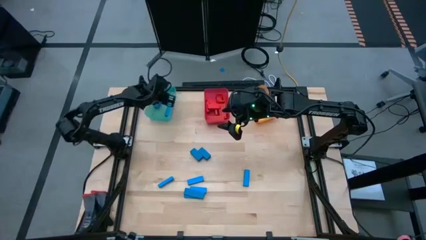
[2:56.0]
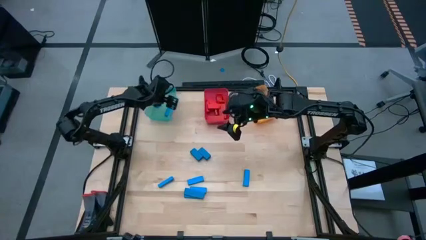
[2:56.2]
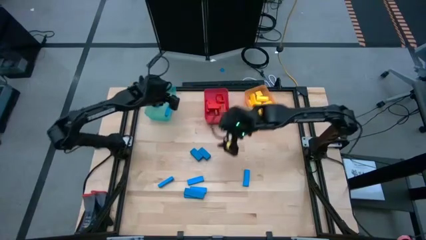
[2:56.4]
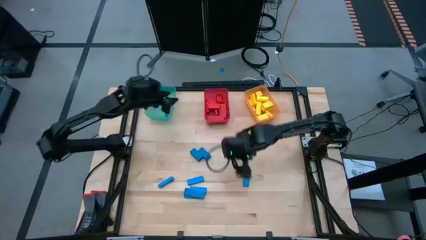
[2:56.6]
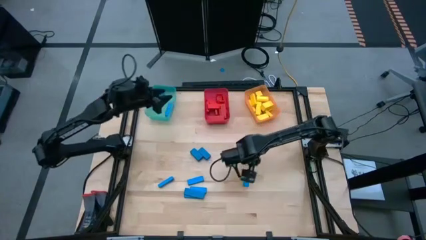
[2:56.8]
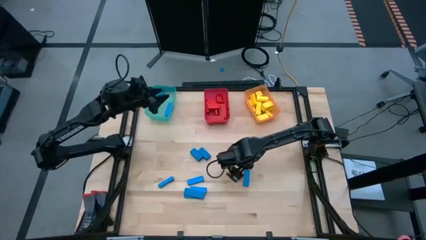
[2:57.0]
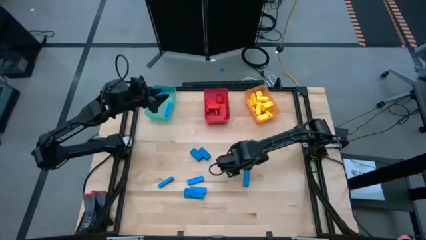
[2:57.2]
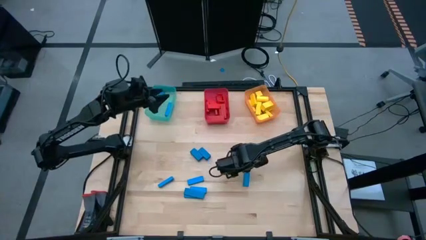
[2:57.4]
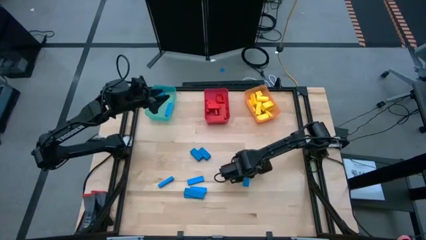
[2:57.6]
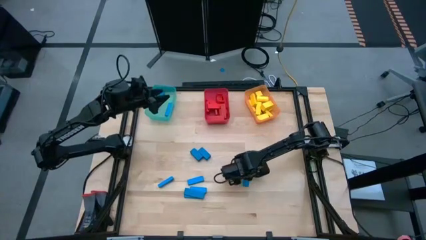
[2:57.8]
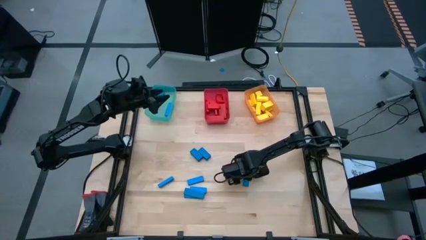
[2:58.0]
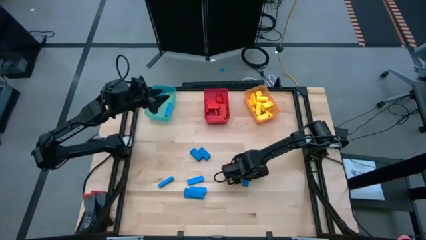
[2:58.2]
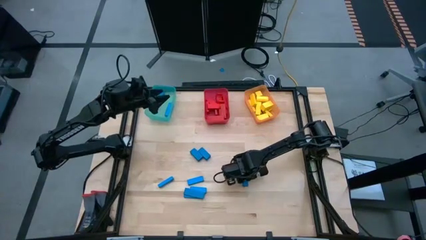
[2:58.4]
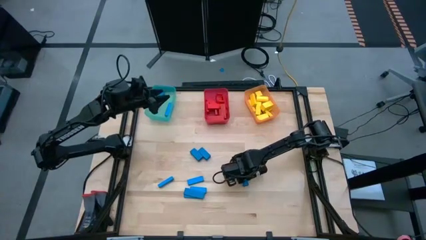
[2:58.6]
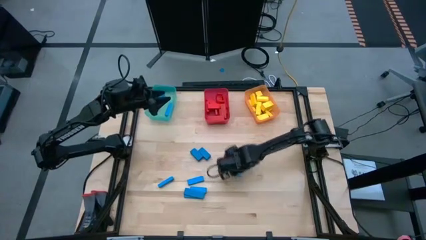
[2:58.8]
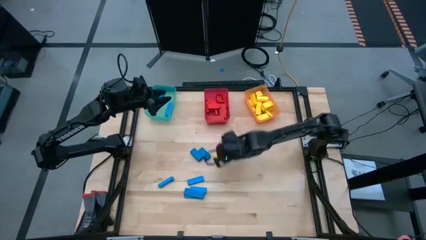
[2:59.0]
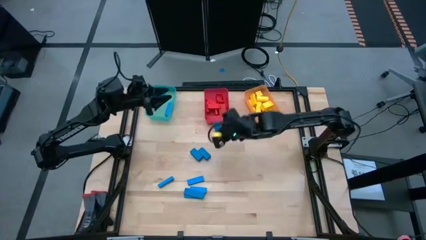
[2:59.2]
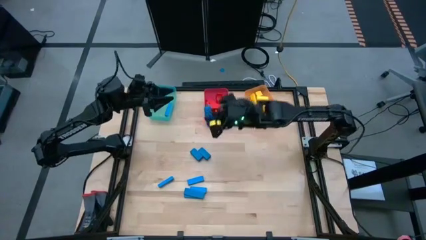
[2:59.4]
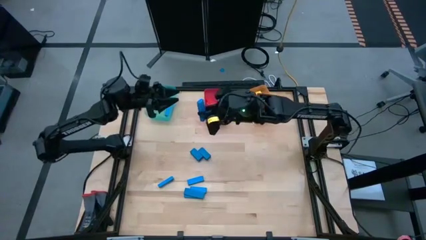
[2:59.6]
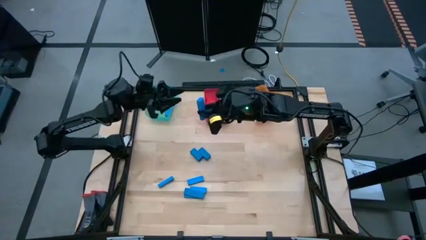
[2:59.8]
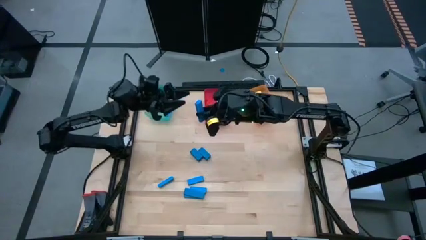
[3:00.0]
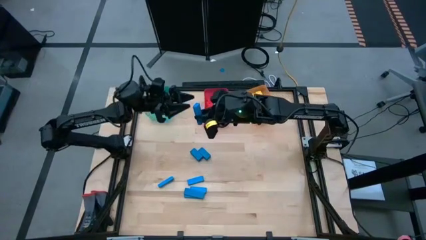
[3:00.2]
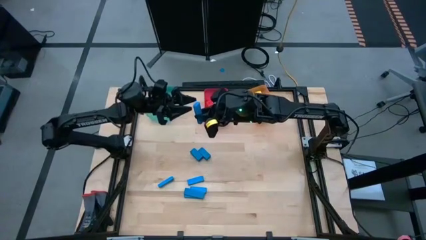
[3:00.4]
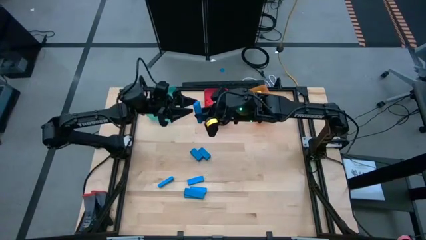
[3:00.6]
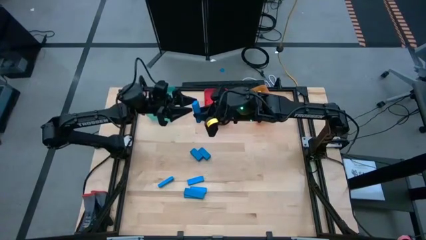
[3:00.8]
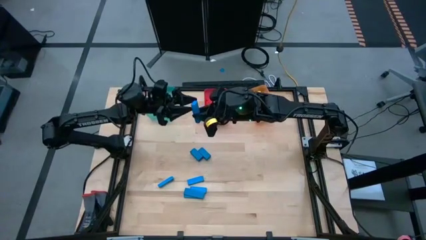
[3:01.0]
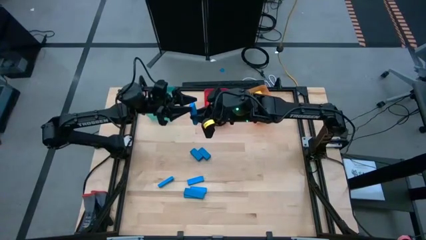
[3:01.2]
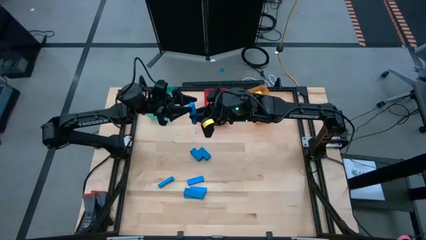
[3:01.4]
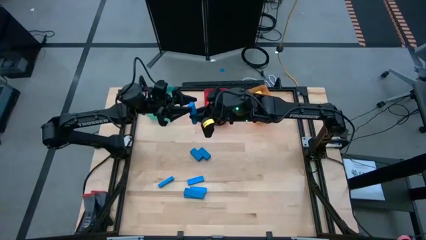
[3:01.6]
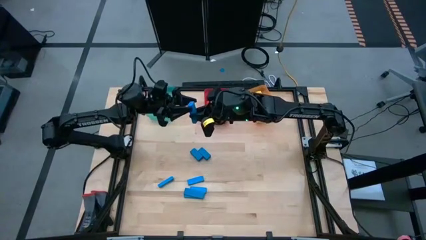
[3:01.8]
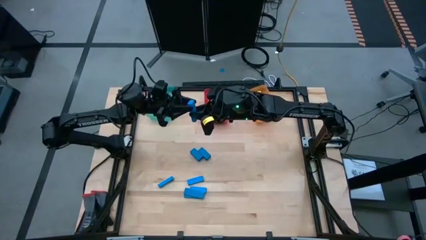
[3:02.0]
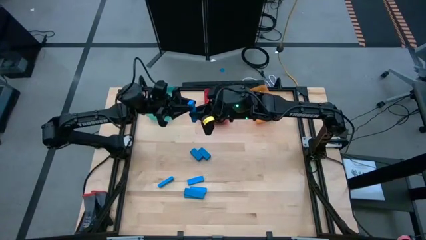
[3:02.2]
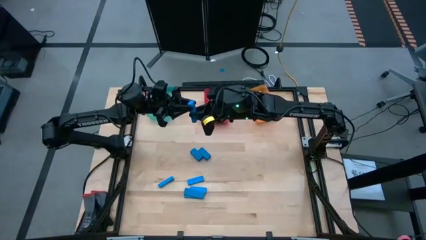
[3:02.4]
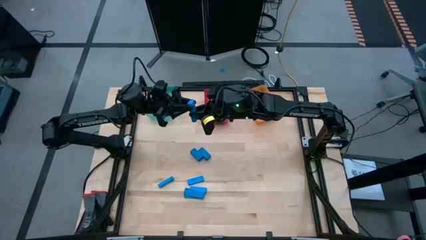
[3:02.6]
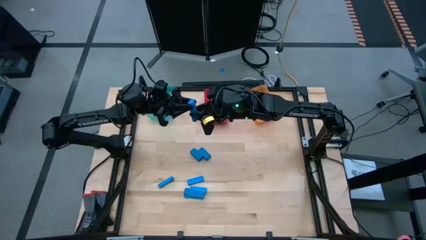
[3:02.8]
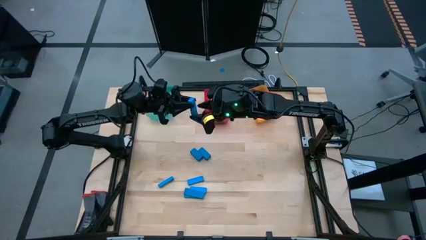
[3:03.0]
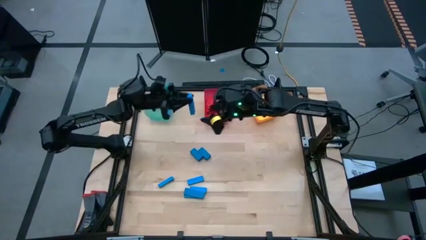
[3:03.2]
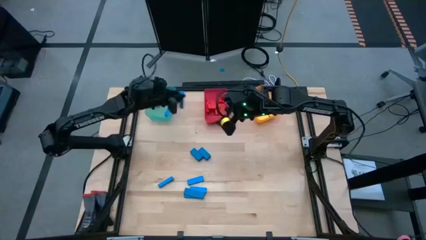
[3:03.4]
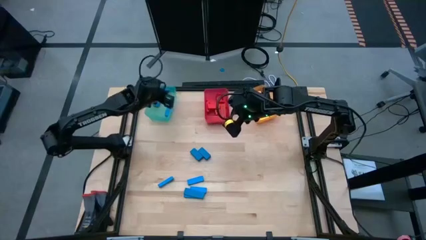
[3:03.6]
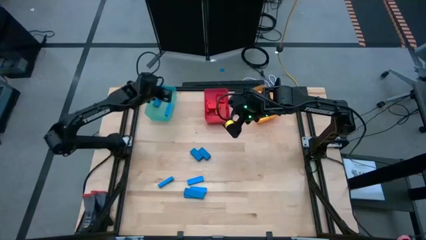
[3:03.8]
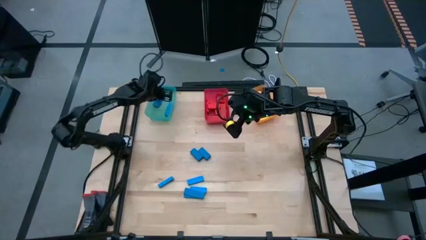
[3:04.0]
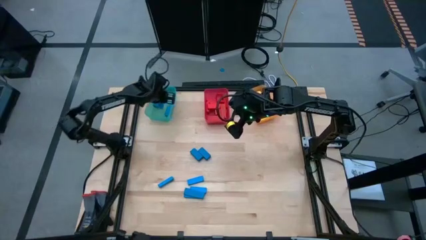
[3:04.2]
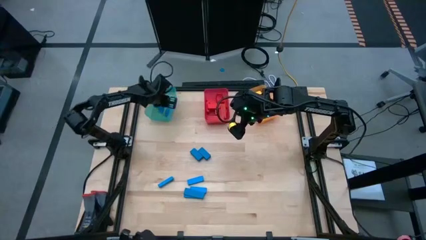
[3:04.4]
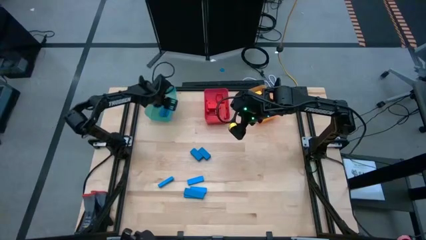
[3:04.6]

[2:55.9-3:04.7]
Task: Sort blocks
Put the blue block into the blue bin

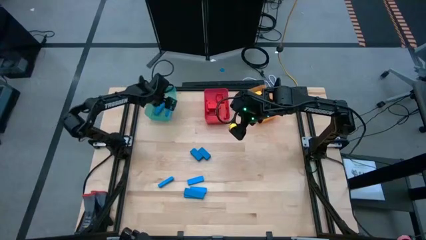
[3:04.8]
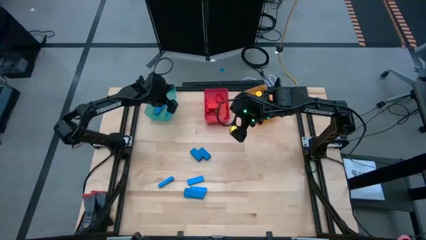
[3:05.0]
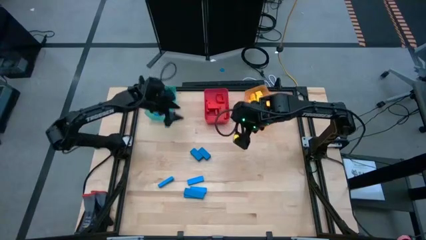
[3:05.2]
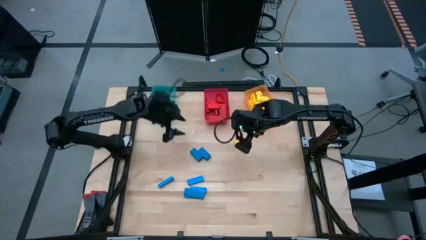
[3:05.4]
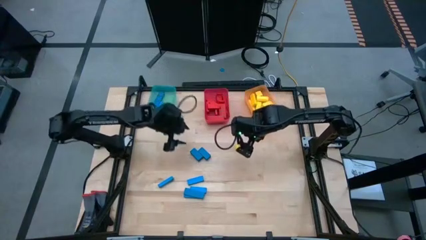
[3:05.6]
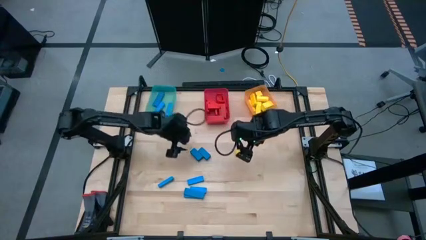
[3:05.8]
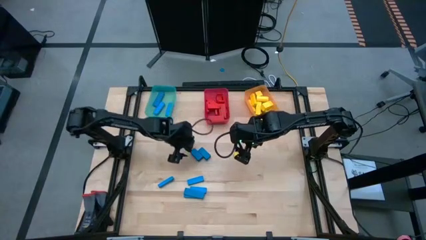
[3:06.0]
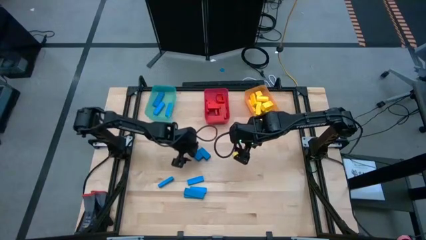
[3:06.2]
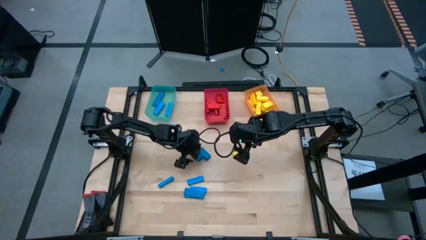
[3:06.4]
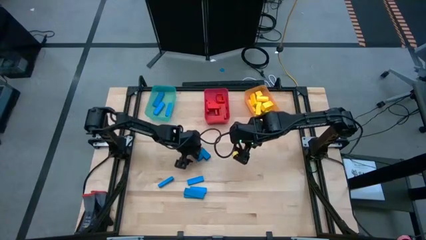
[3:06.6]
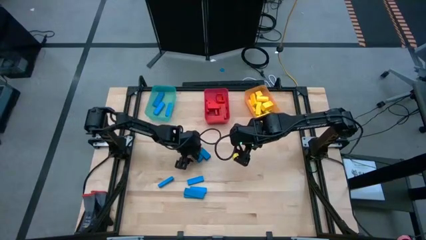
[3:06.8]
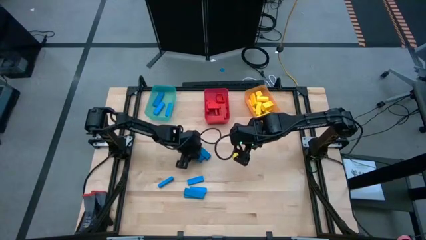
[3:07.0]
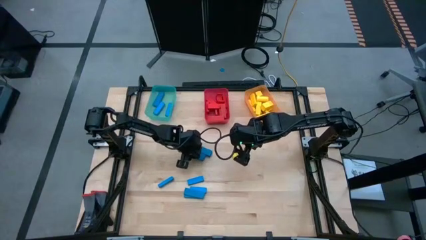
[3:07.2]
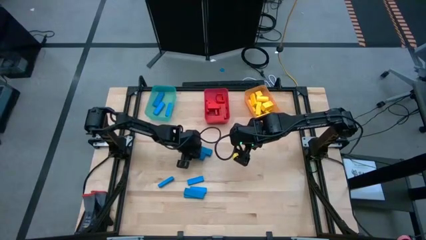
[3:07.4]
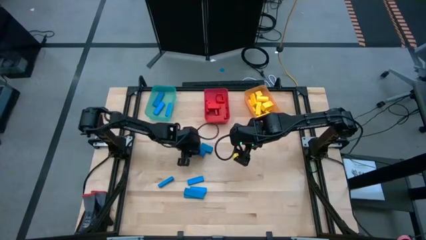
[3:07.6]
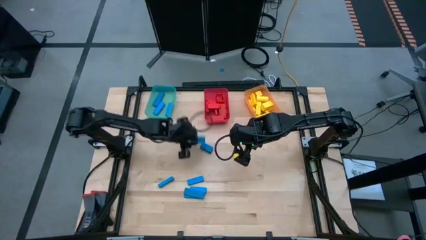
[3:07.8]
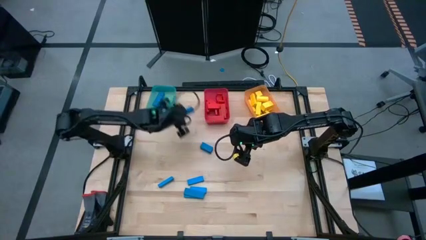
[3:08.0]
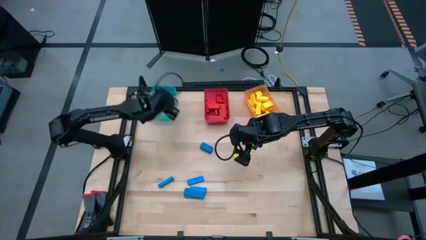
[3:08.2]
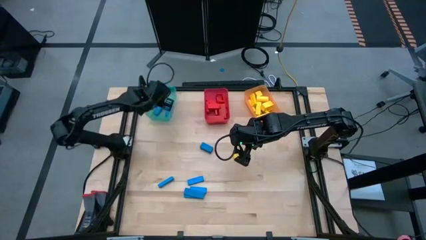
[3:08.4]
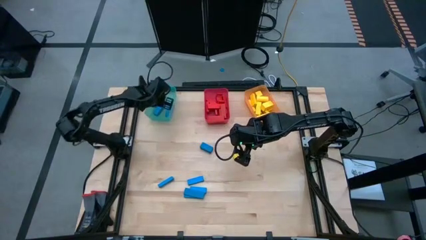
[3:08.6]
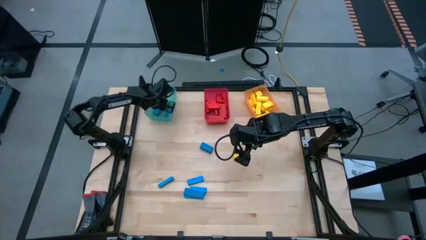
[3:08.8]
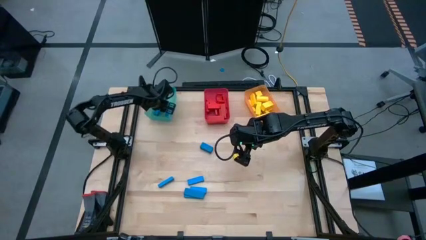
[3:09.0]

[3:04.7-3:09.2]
Put the blue block into the blue bin
